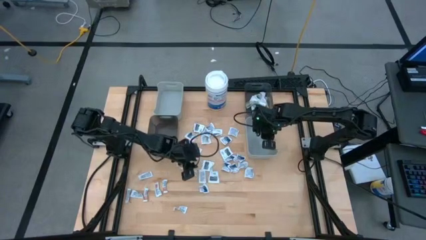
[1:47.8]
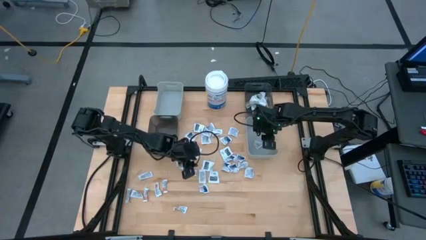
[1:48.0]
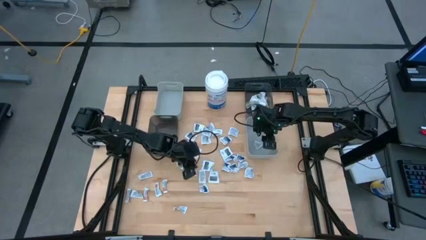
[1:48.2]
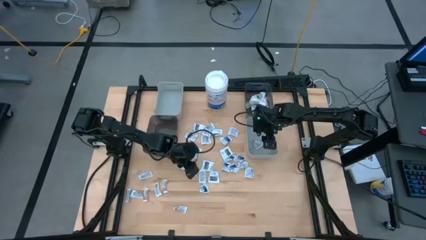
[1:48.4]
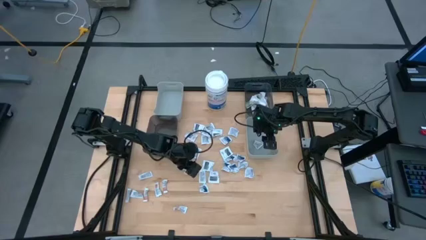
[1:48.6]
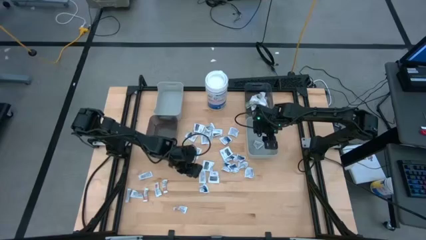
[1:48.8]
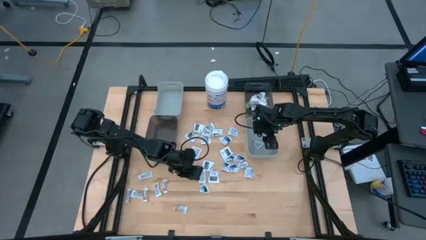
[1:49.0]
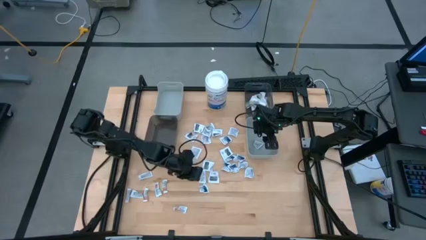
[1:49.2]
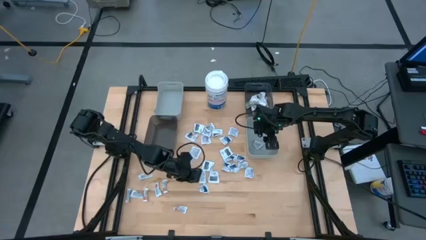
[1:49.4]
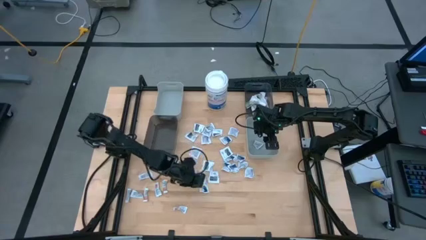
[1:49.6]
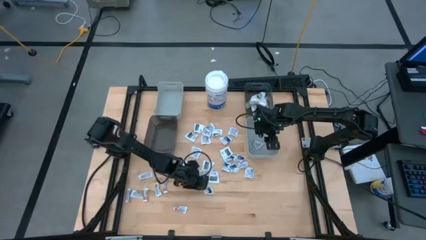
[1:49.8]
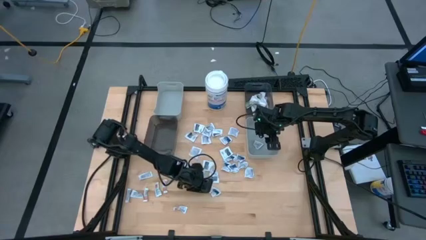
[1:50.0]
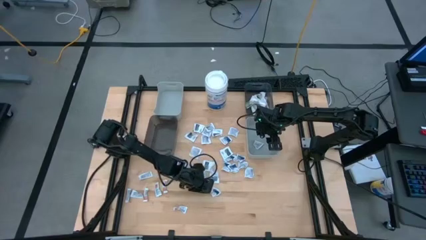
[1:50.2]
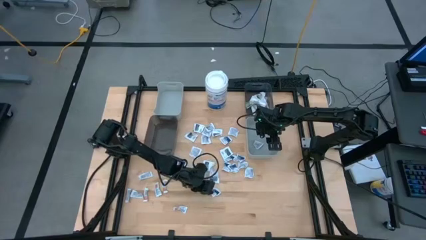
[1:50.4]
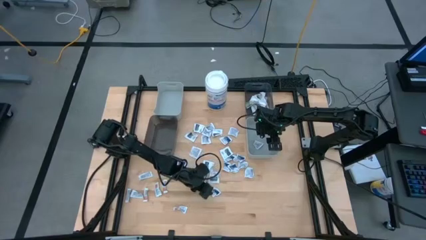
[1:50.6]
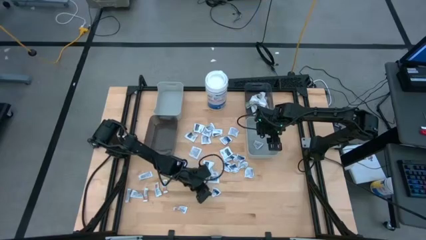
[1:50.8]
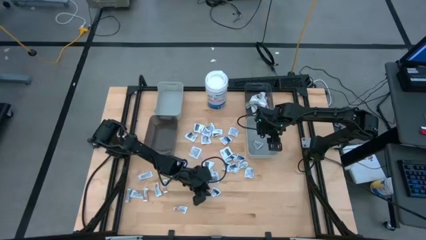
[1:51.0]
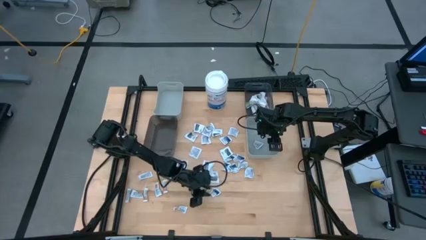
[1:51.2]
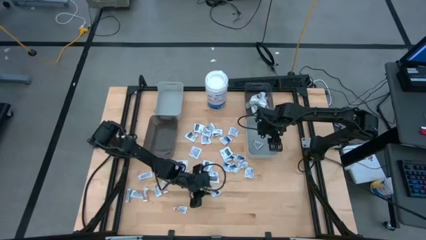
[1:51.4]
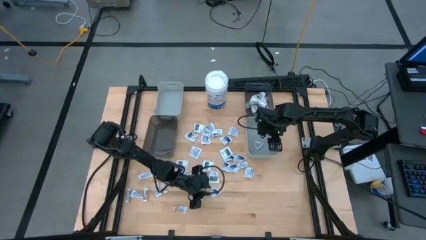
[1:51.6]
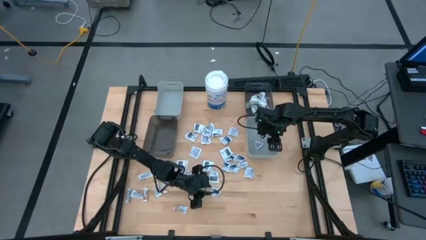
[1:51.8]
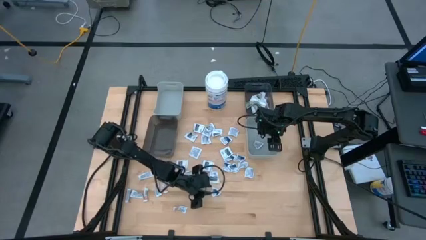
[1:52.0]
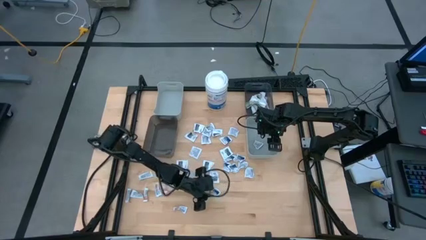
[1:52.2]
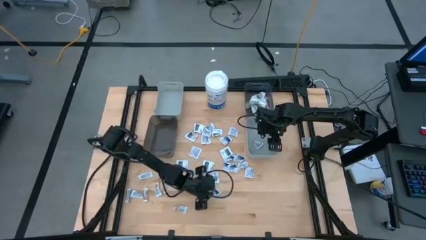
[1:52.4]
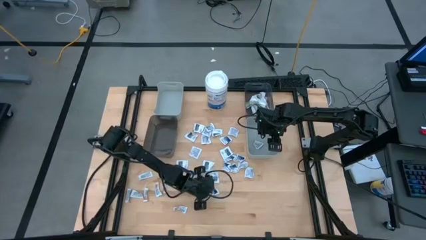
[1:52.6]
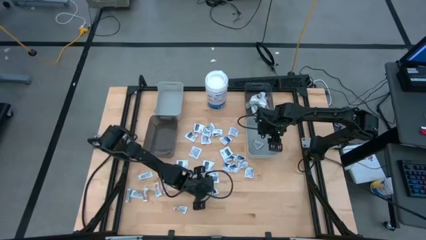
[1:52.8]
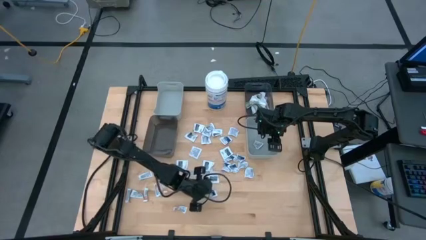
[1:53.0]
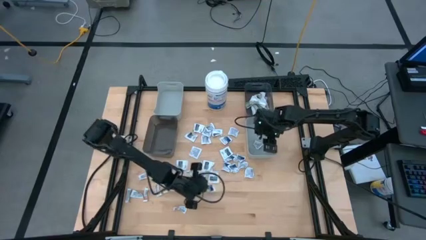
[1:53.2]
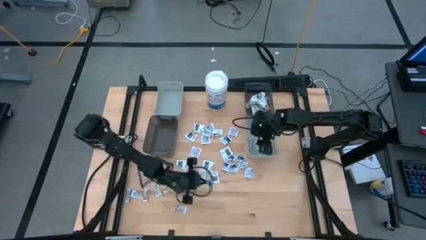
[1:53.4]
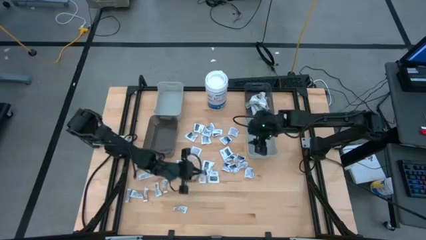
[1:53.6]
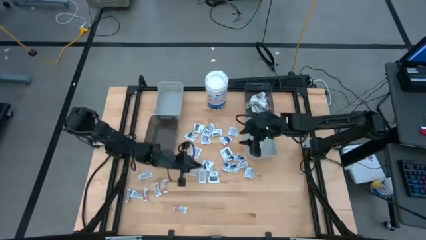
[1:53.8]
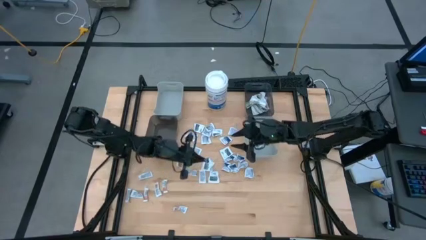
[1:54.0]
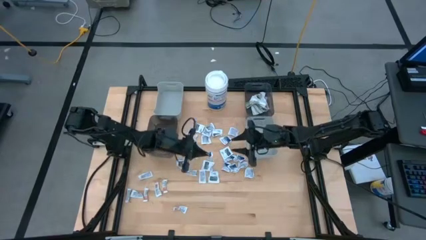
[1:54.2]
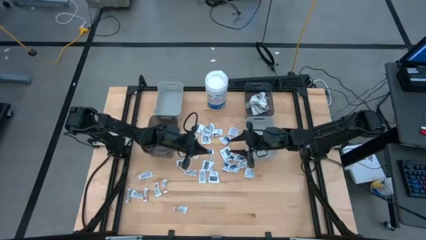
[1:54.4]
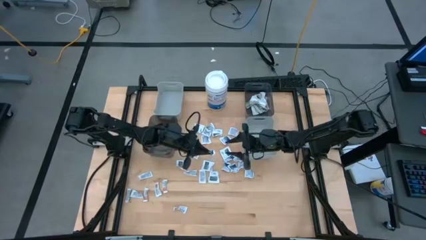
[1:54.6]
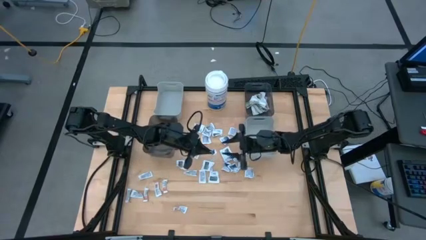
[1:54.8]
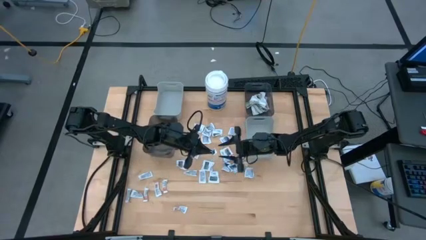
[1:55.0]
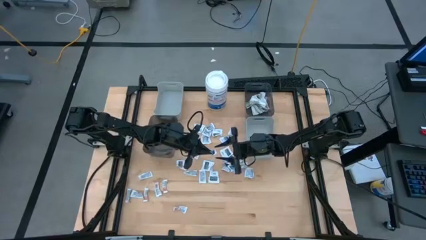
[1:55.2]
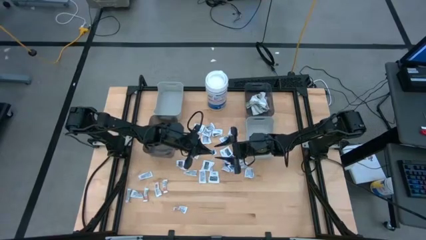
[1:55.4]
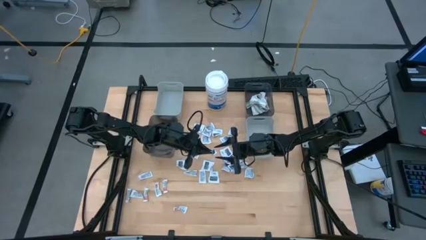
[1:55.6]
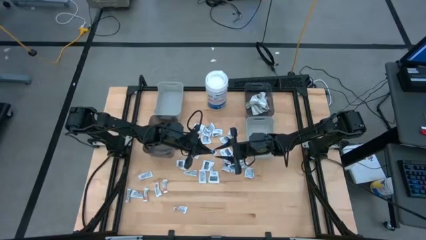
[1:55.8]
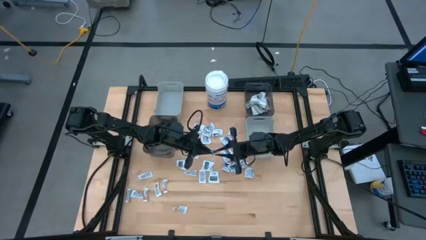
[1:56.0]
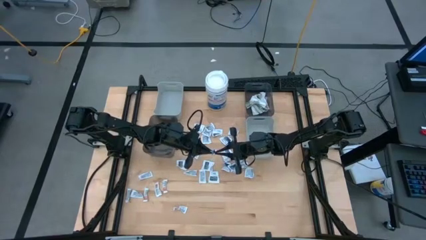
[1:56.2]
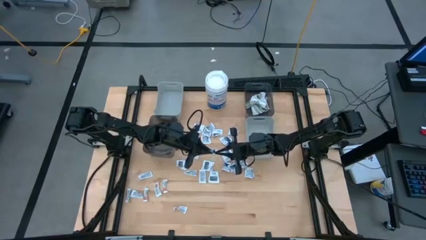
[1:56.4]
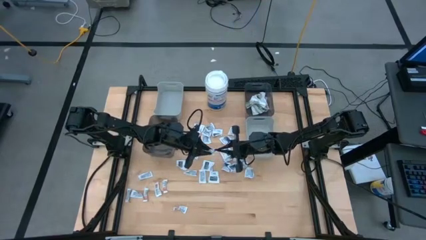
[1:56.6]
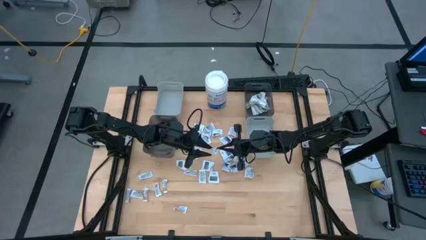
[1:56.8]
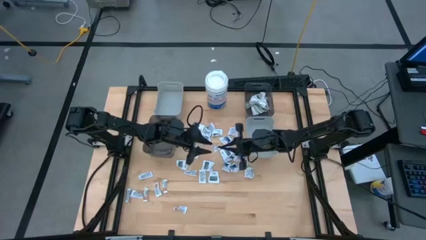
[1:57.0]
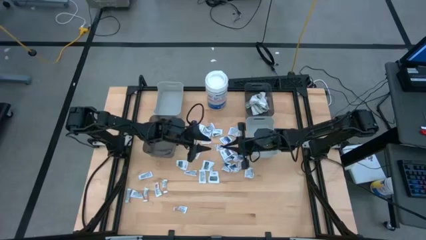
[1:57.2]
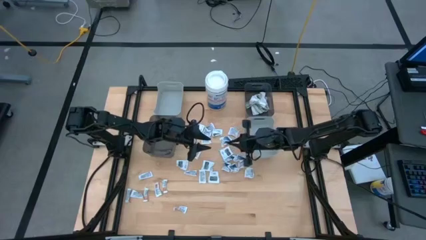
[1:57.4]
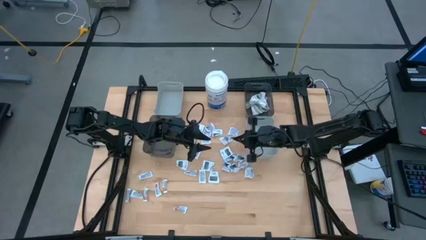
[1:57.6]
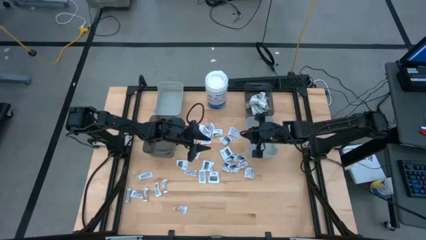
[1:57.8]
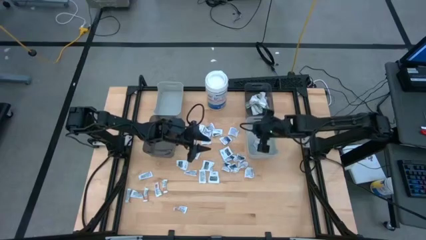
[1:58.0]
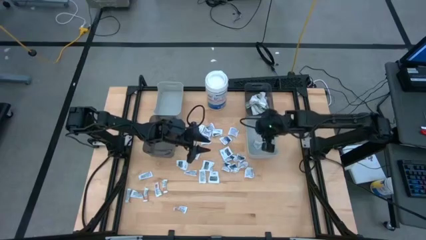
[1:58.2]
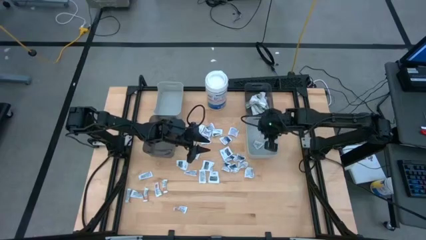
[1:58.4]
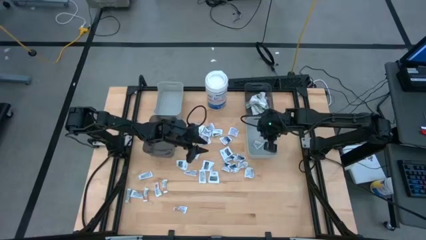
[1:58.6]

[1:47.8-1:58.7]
Task: Pick & Place First Aid Supplies
Put the blue alcohol pad into the right gray bin
